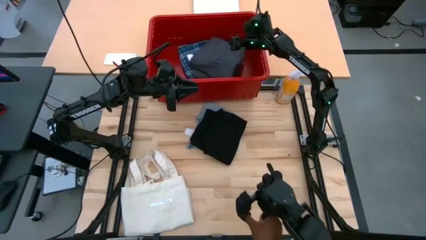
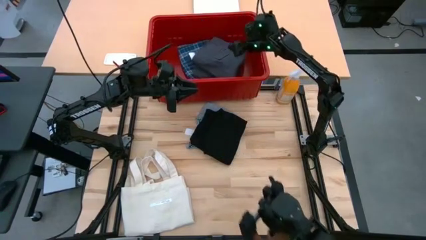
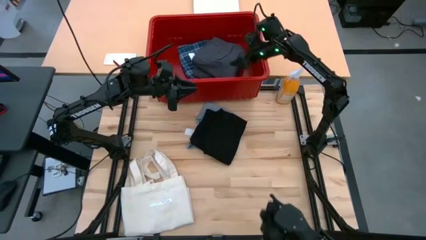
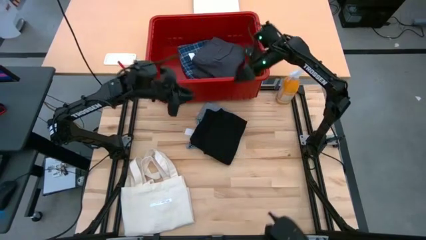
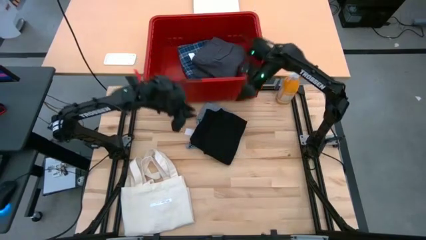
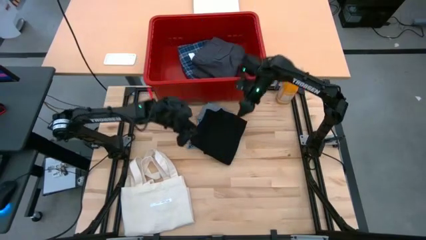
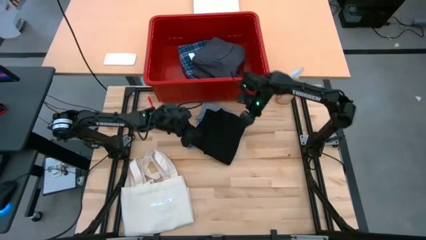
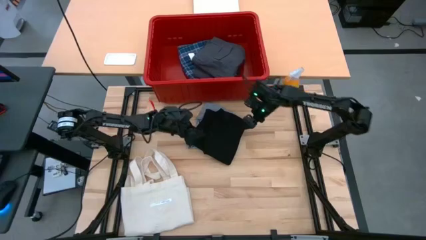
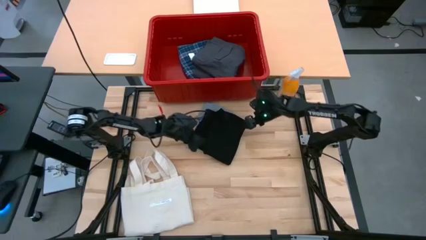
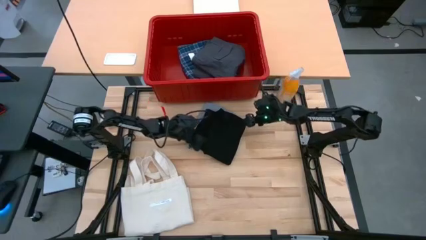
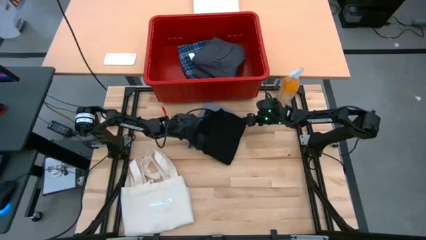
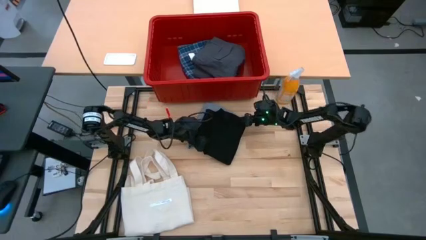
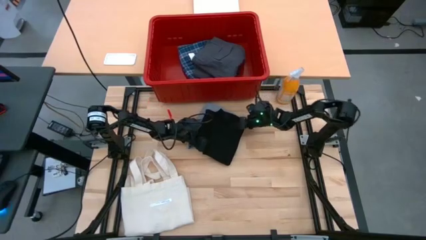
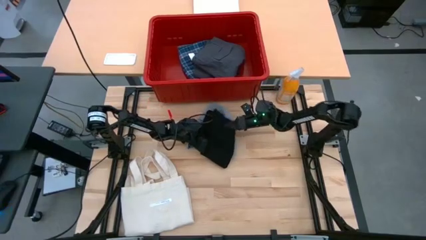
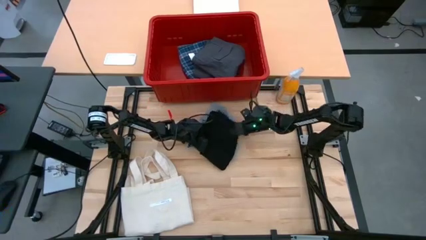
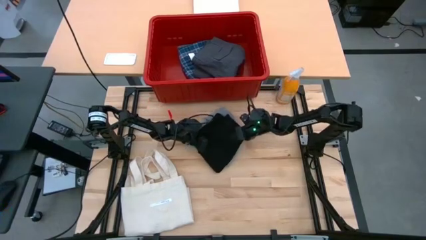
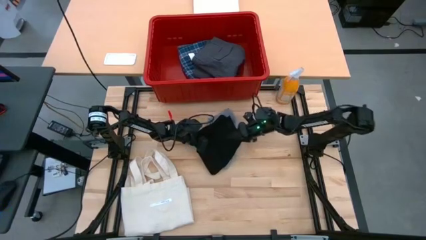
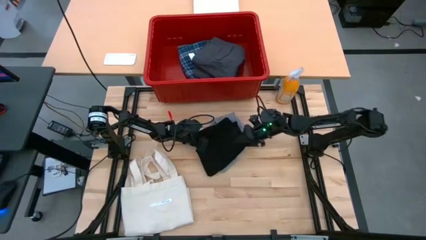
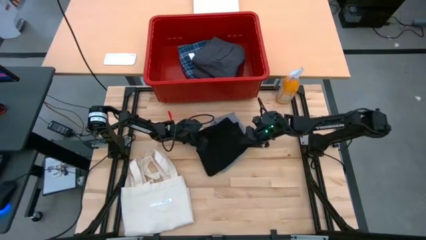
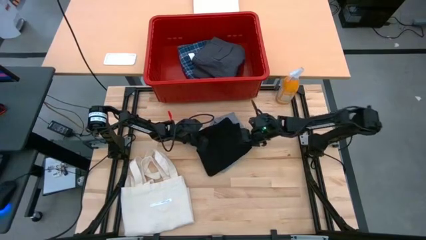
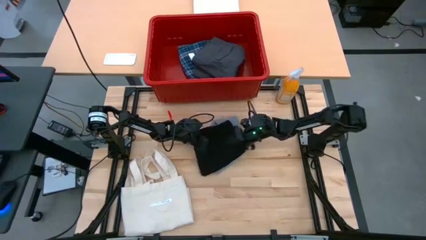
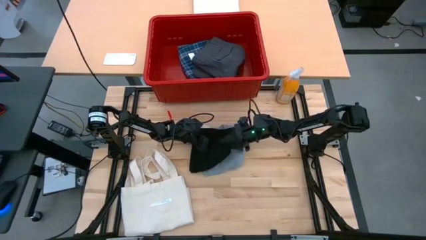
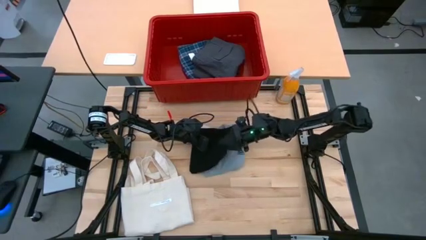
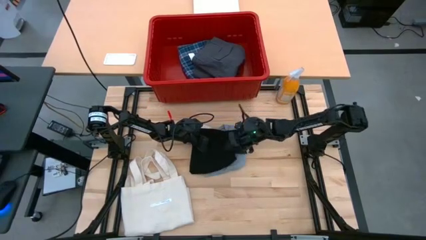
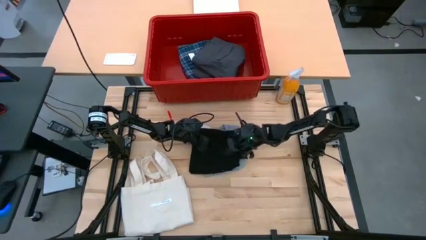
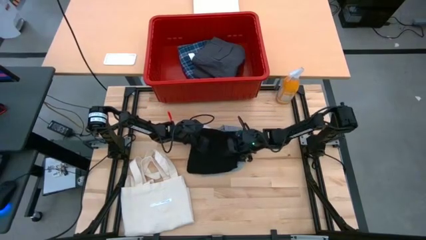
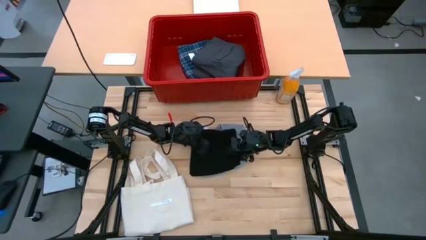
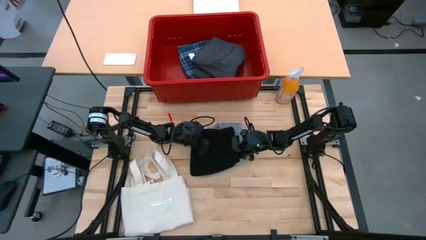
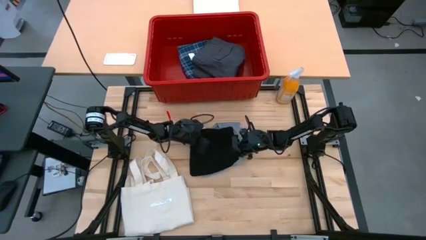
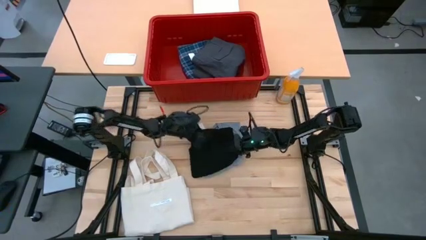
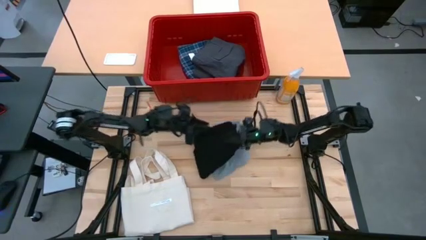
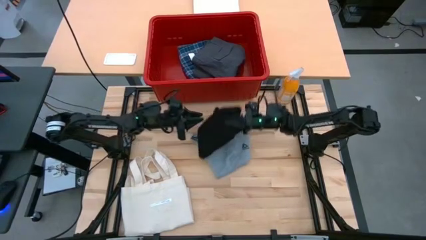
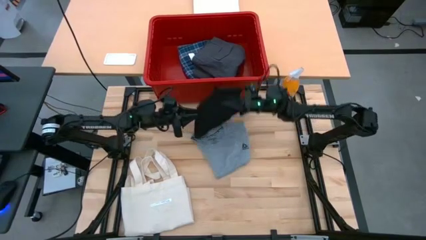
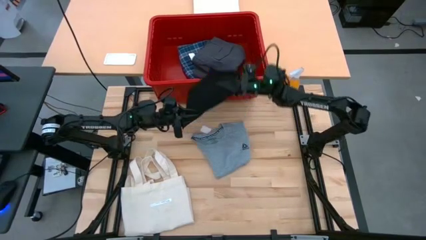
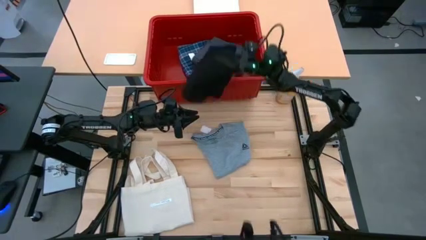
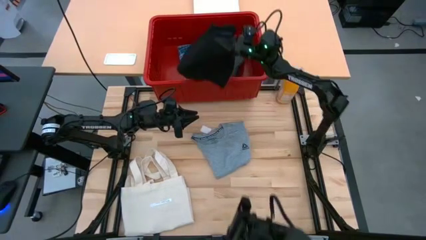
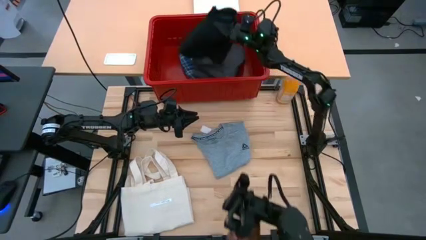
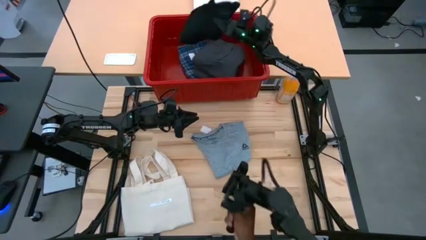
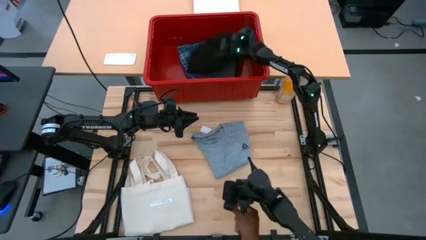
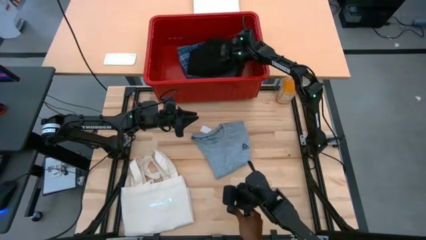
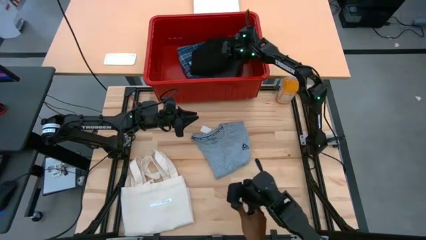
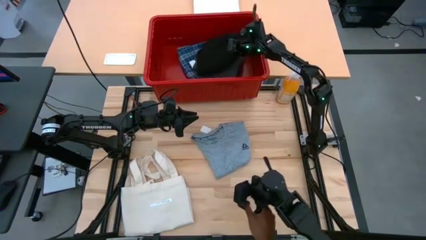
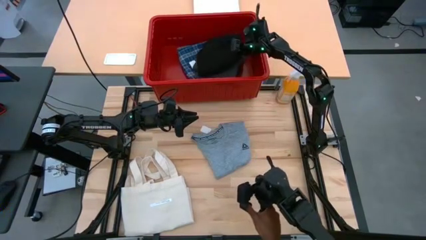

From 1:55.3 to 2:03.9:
Task: Fold laundry
Stack the black t-shirt in the red organizer bin

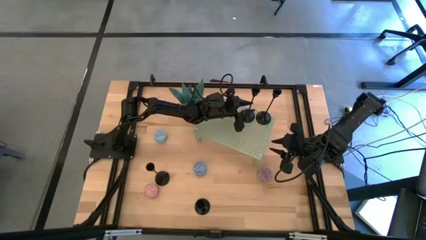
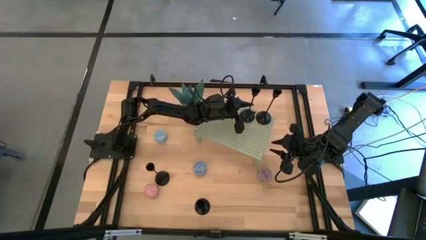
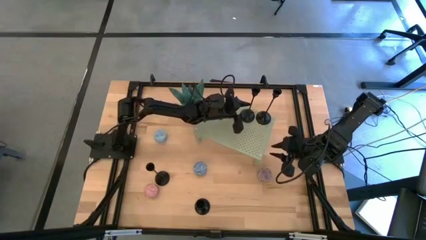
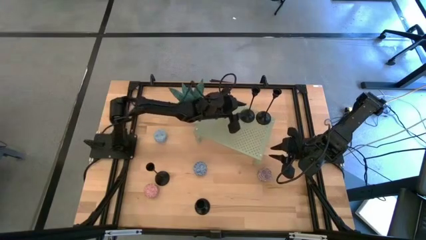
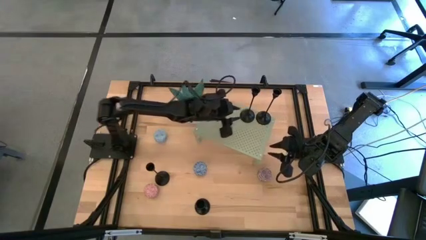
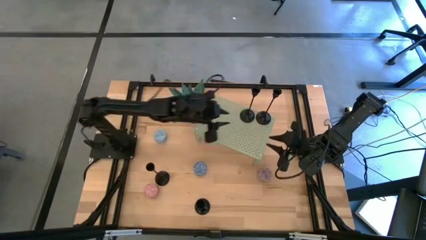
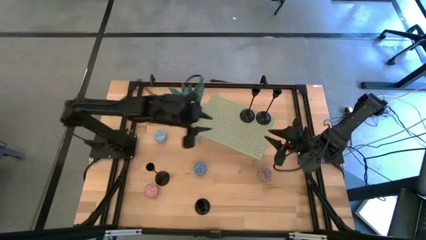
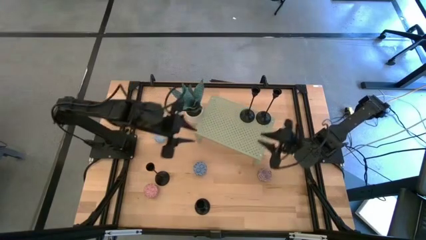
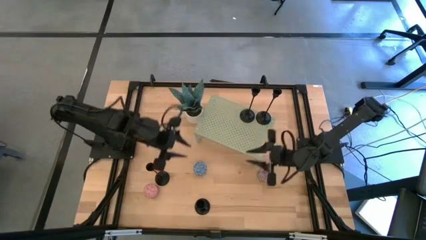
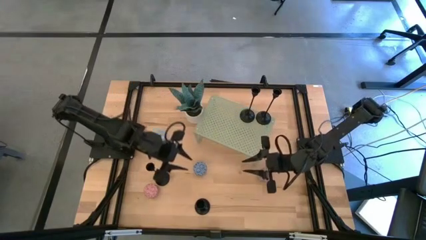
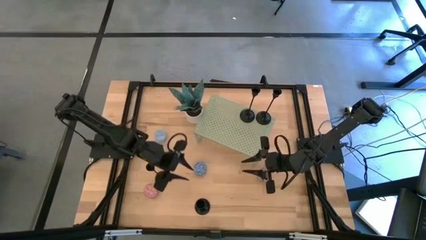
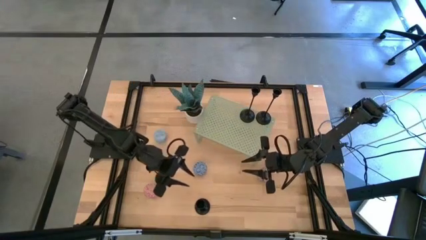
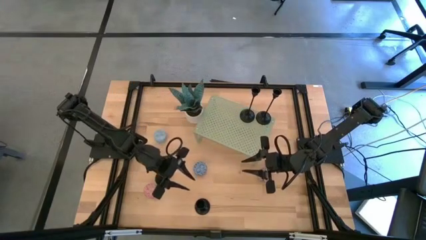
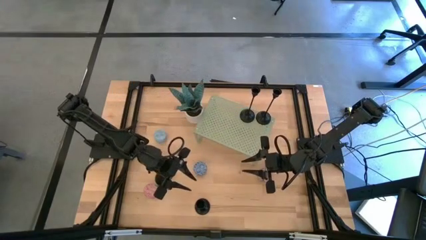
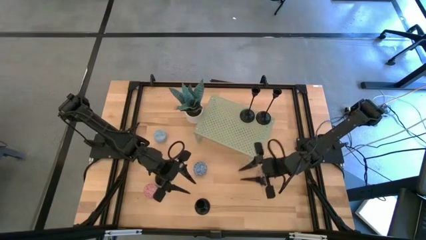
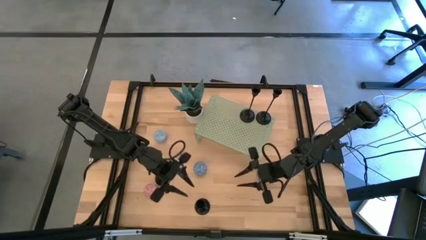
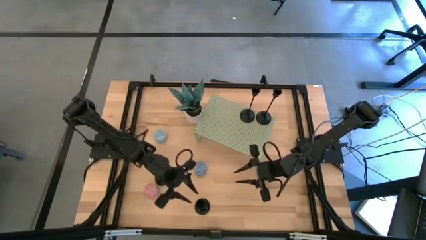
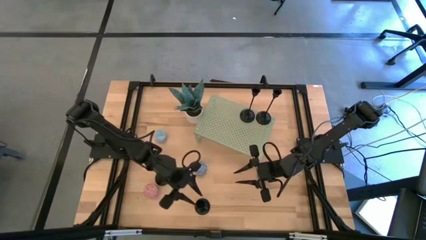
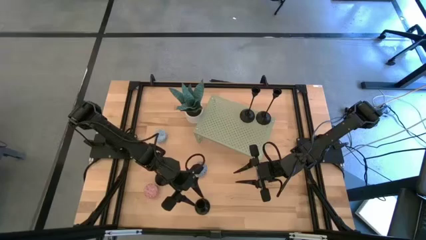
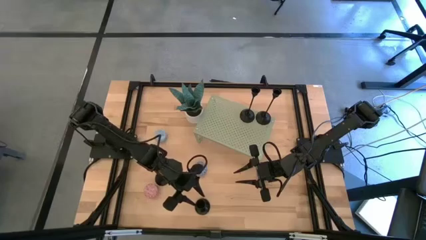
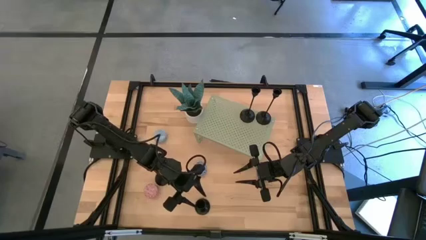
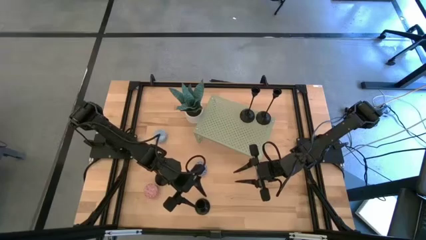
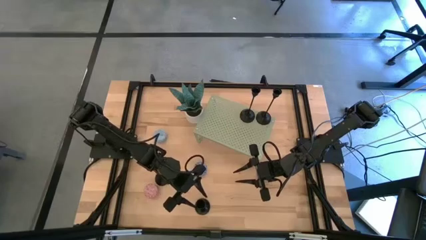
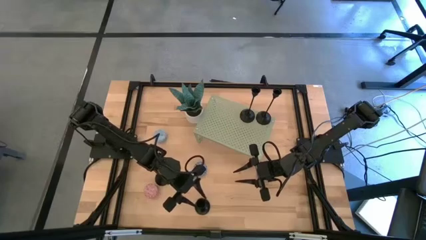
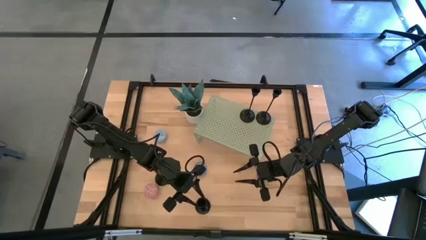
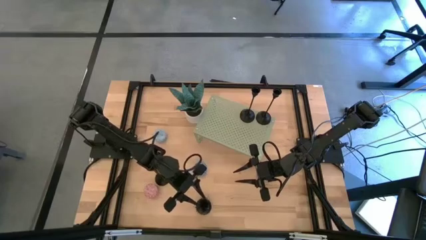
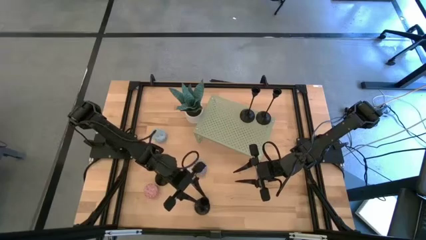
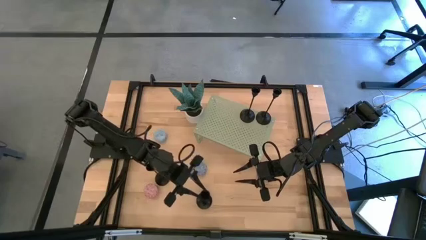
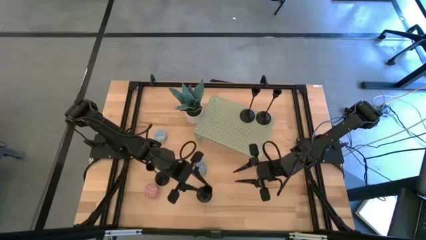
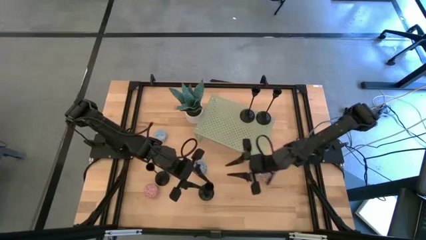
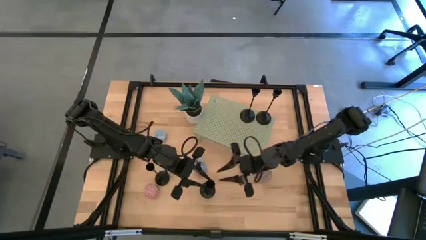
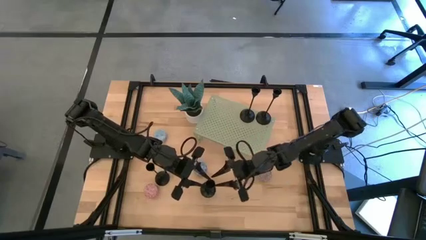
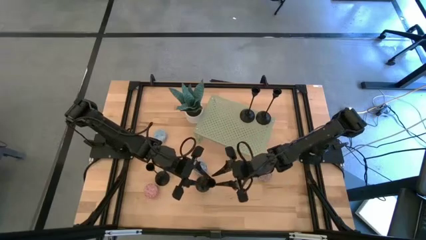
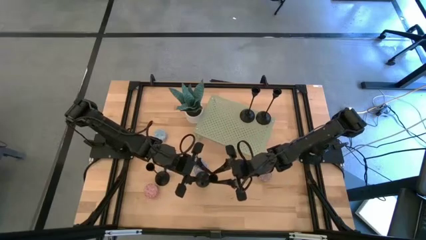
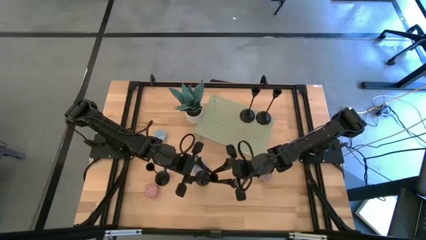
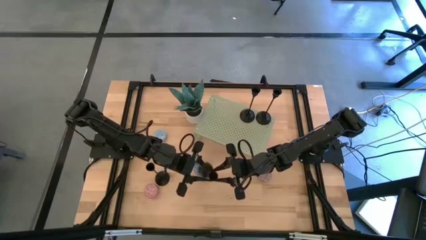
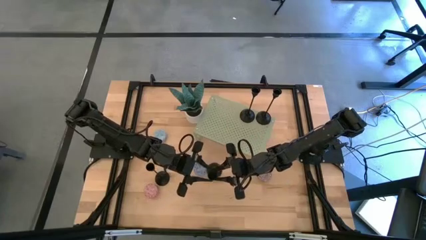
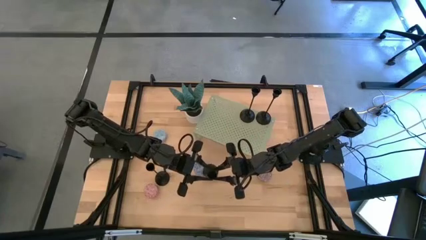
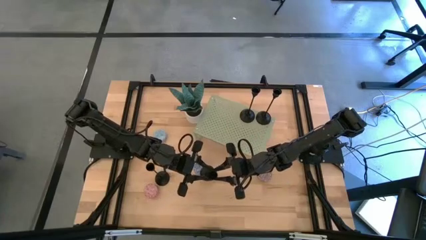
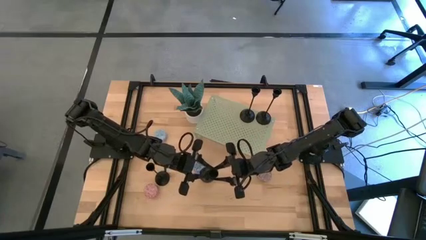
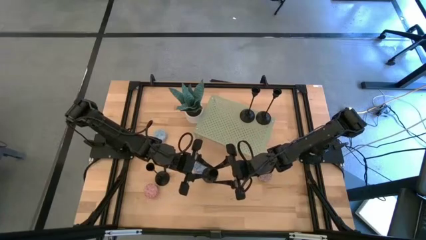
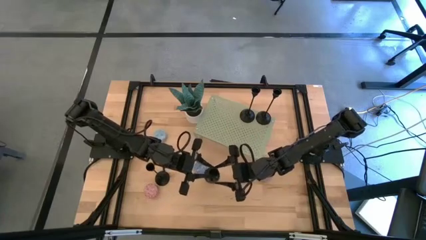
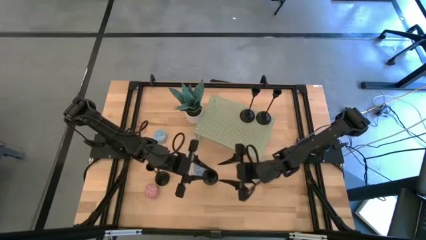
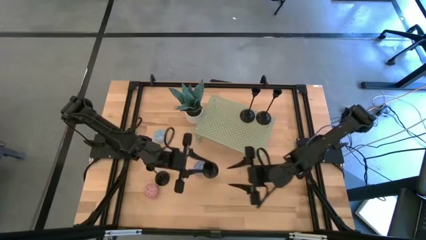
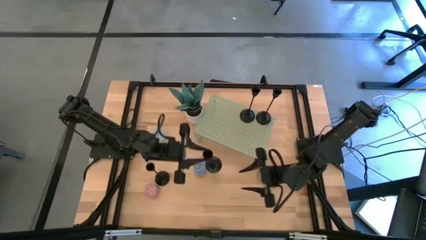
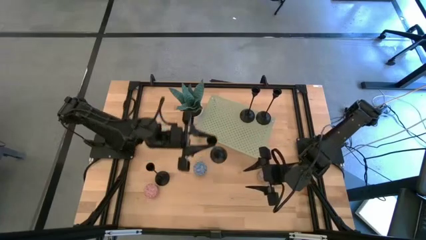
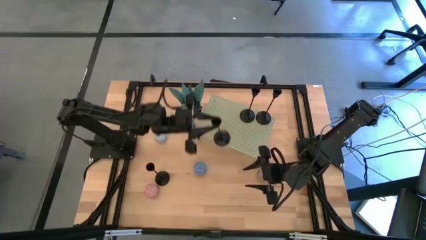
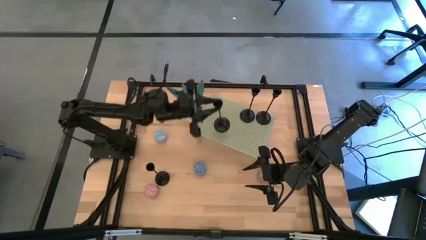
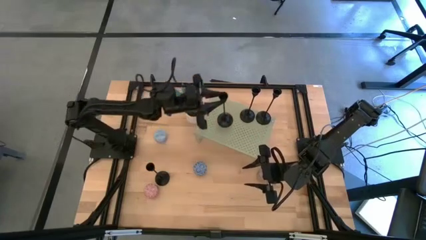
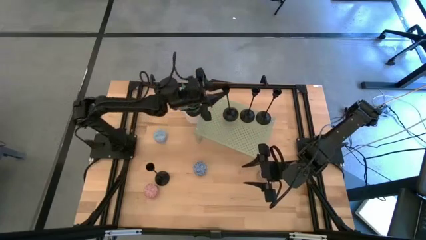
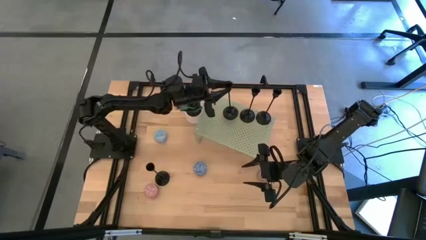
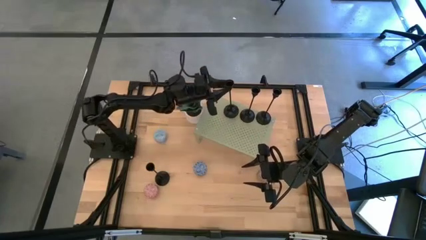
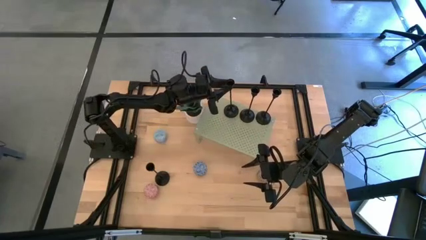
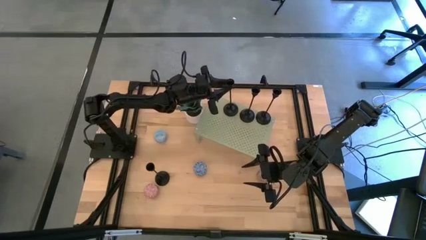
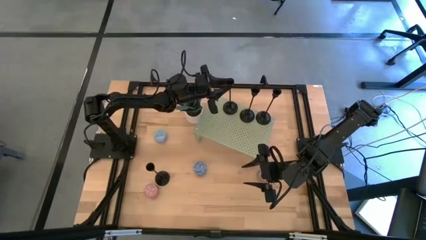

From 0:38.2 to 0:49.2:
Task: Stock candles and holders on shelf
Align the black candle holder with the other black candle holders on the shelf
